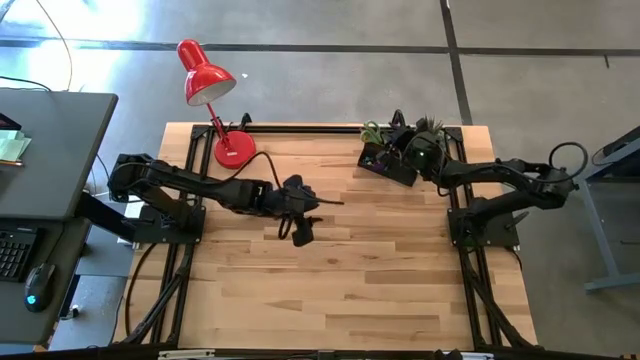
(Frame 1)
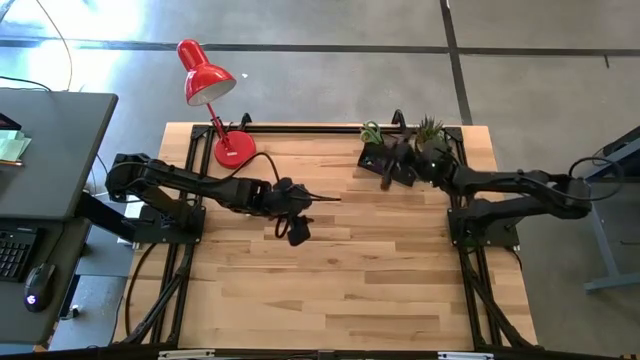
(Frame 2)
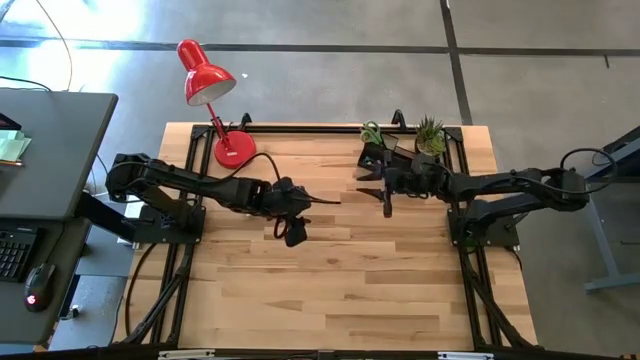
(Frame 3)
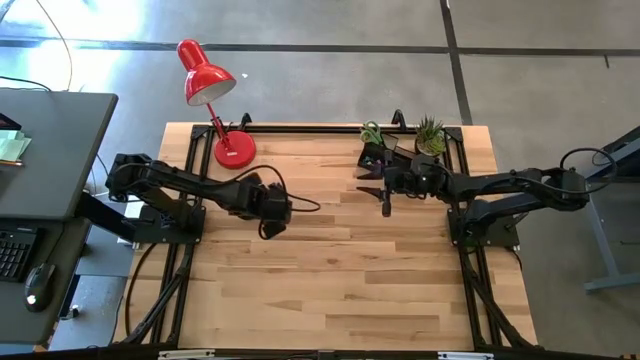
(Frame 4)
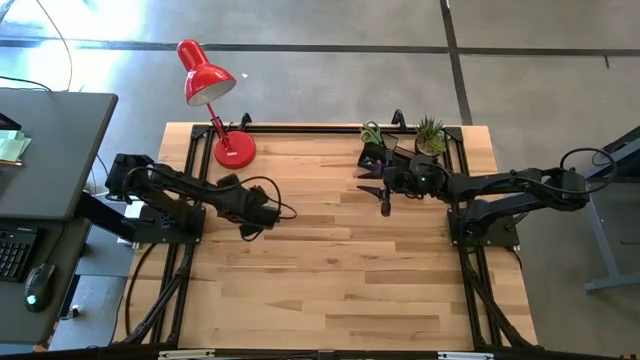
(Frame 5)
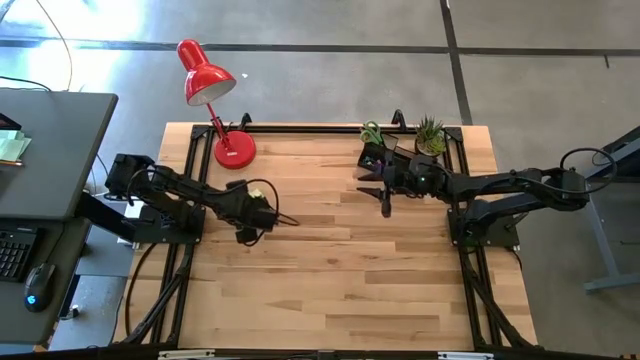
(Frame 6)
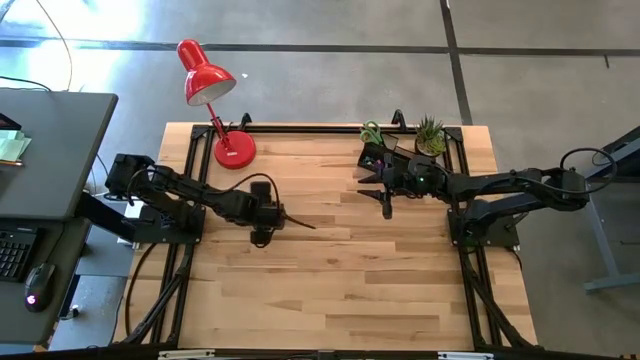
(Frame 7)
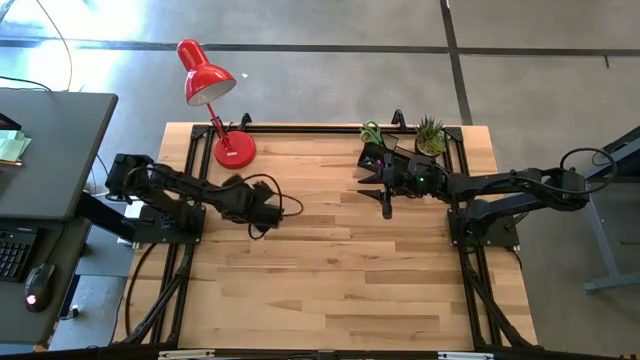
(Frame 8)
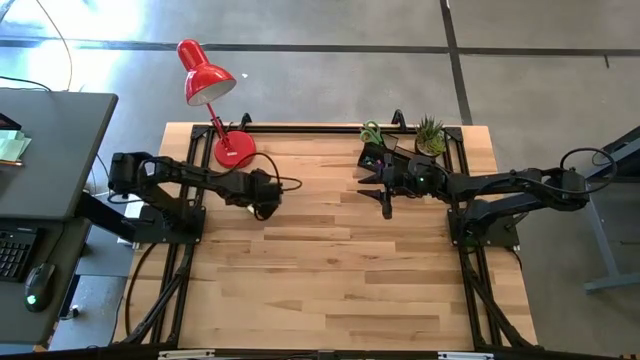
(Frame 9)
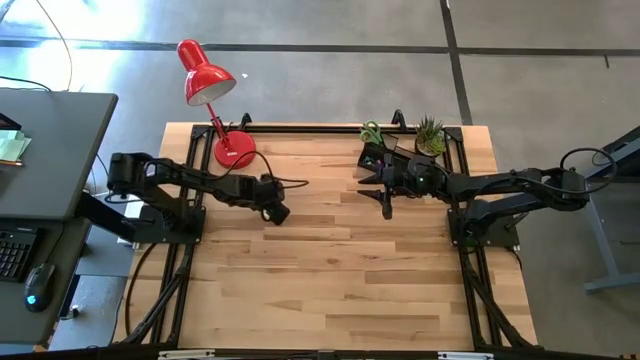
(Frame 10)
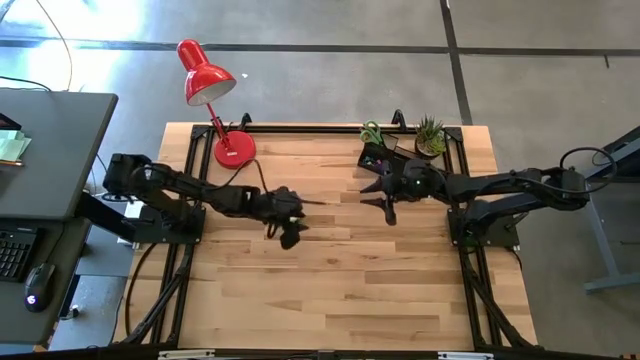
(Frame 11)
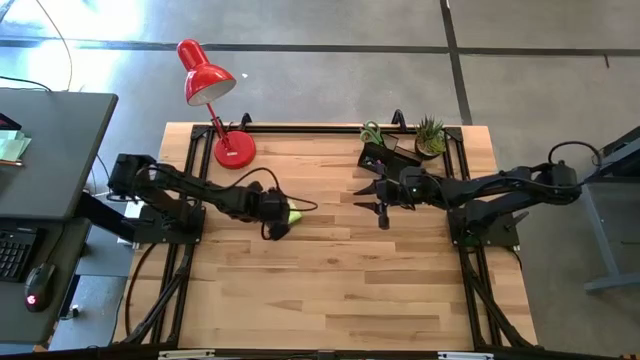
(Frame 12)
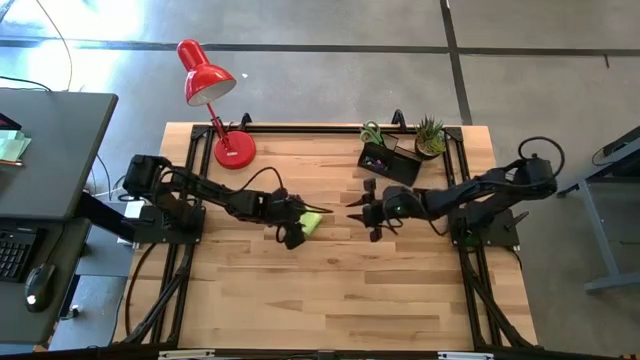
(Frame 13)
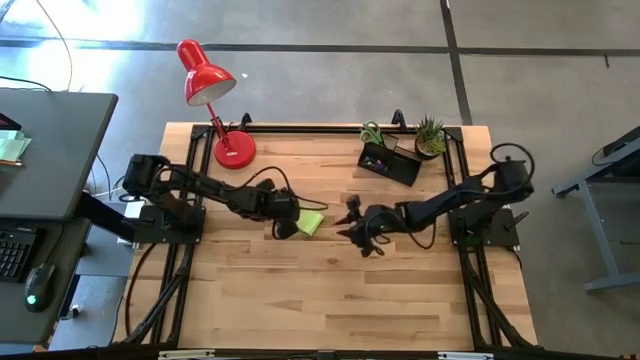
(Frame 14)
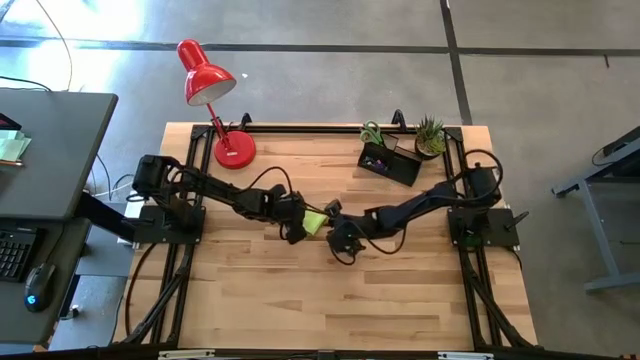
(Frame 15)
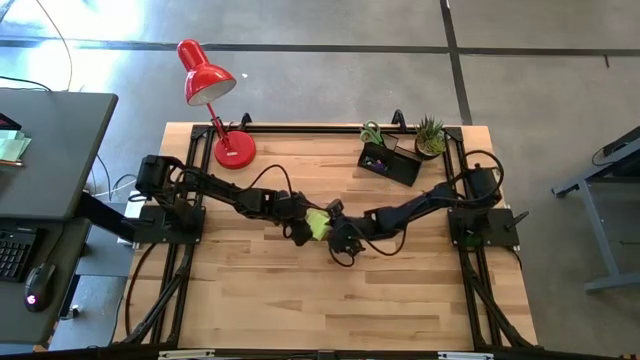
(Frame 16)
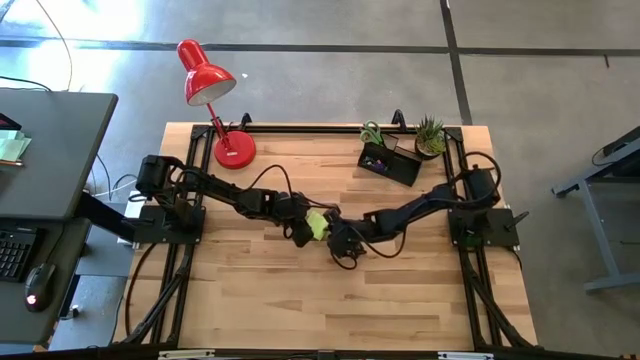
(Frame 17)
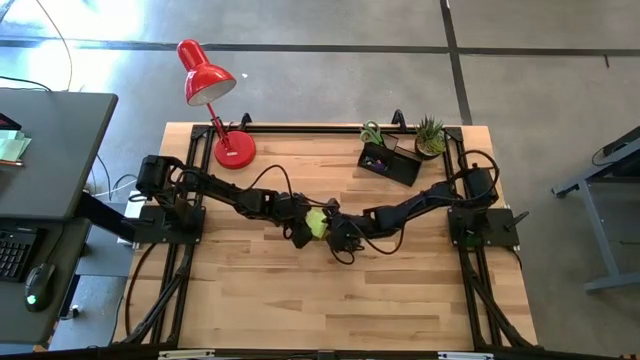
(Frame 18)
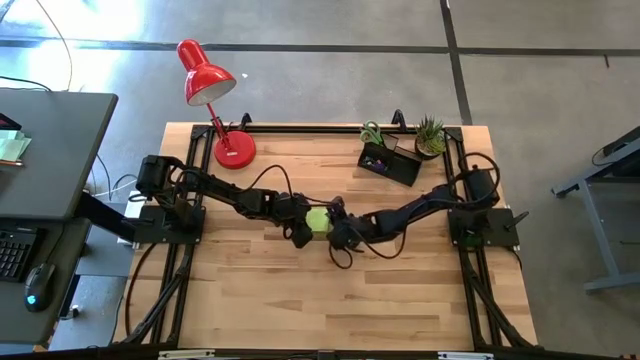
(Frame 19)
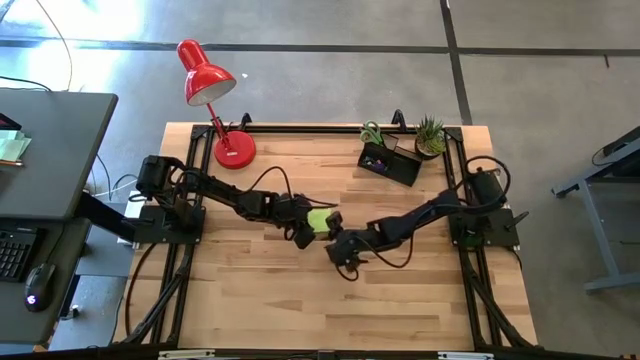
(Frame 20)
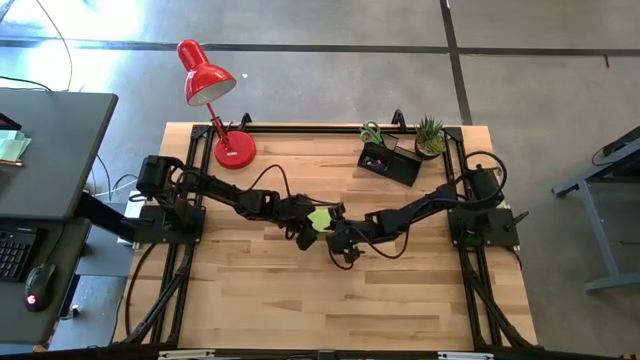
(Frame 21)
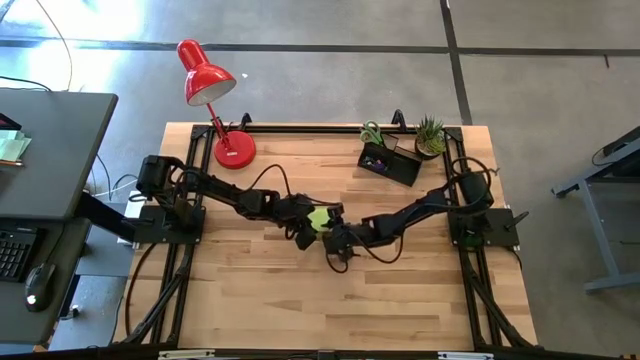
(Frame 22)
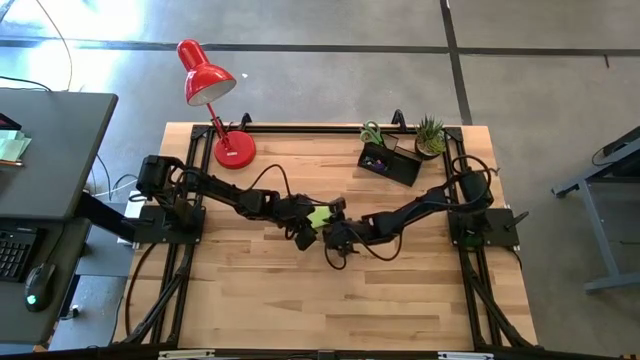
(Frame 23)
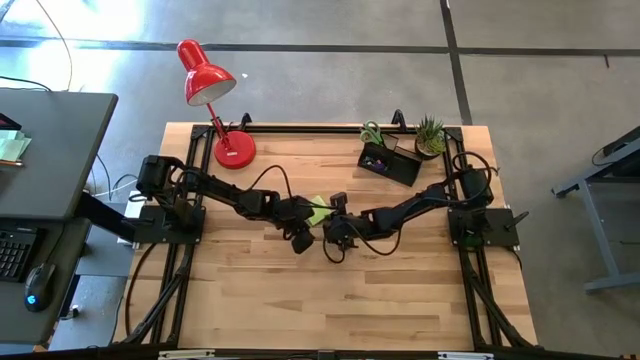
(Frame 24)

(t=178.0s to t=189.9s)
Task: Pick and place office supplies into organizer
Put the green sticky notes into the black desk organizer

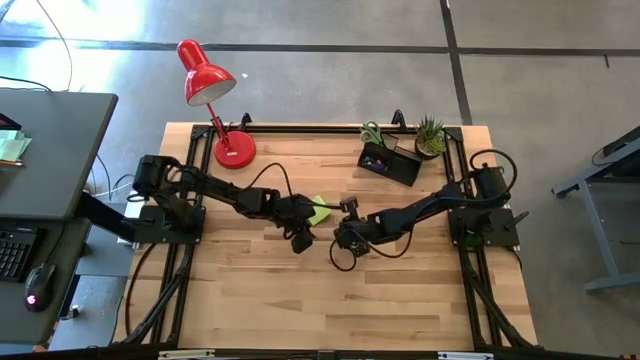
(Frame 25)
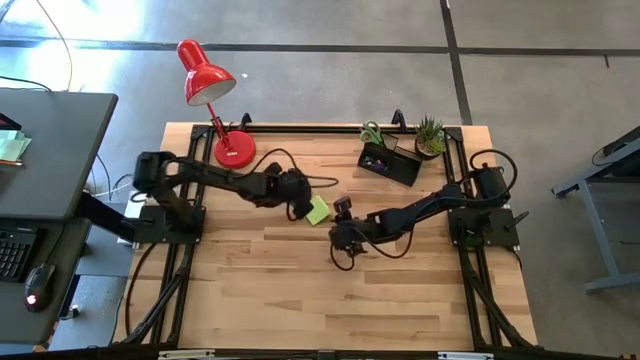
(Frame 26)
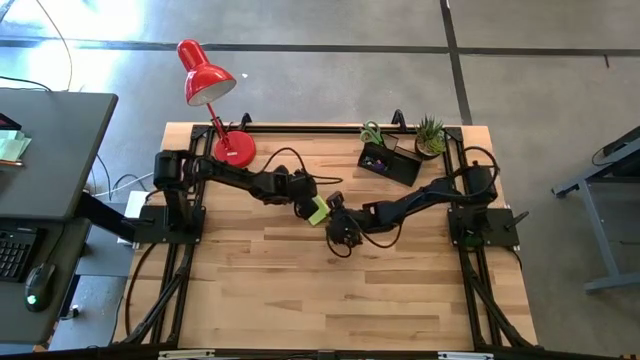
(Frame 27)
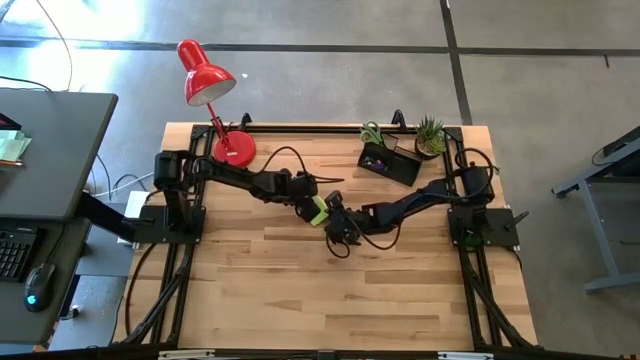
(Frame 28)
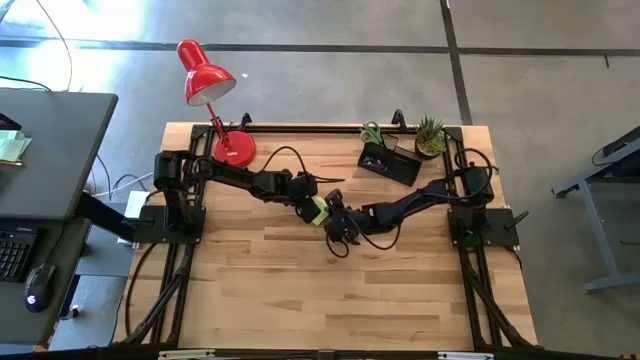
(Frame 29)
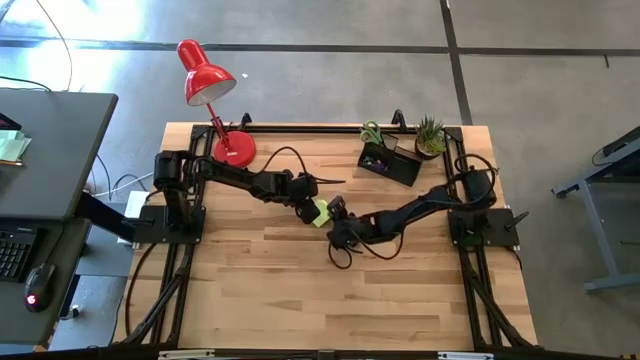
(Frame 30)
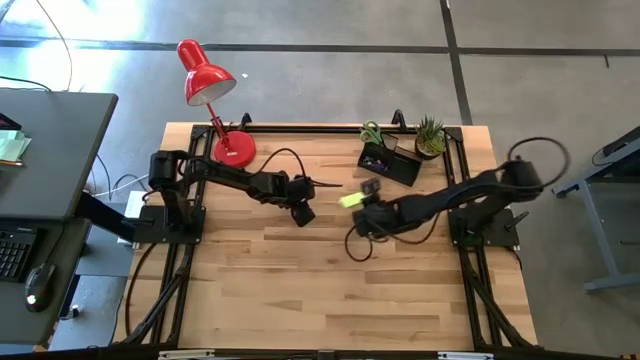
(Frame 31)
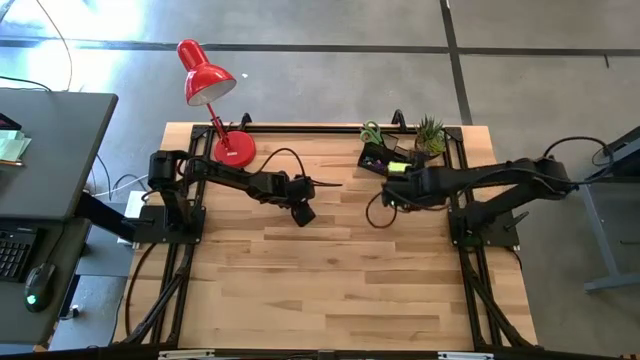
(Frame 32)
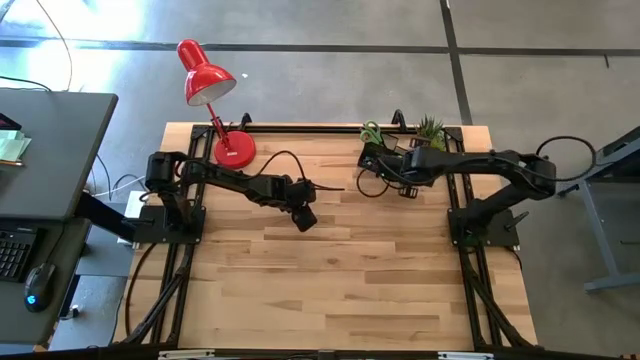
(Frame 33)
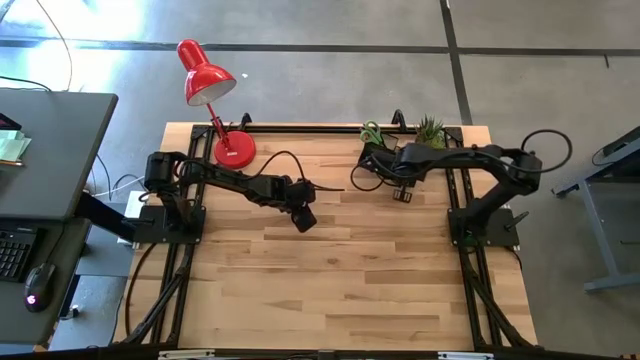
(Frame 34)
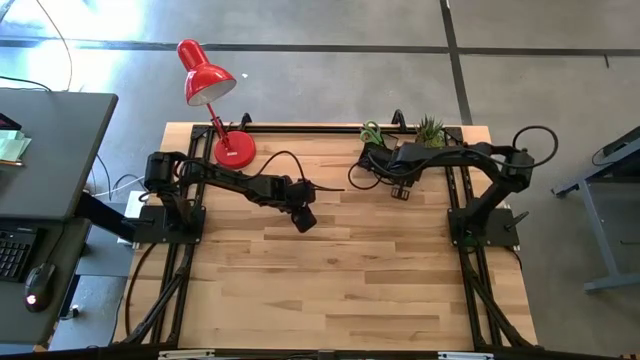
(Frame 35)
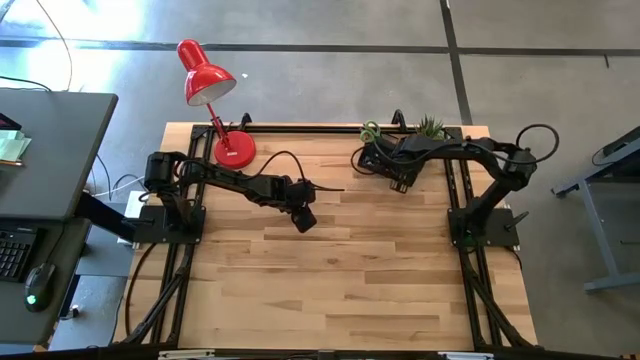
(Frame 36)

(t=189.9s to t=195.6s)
Put the green sticky notes into the black desk organizer

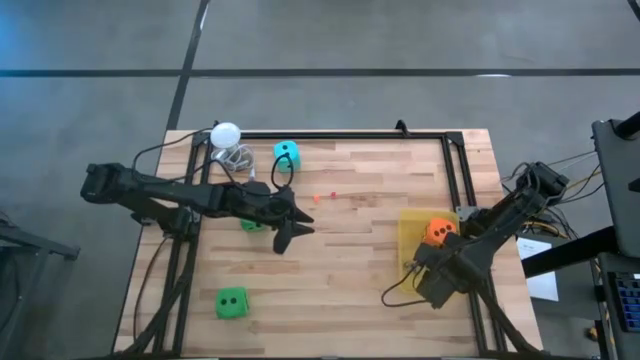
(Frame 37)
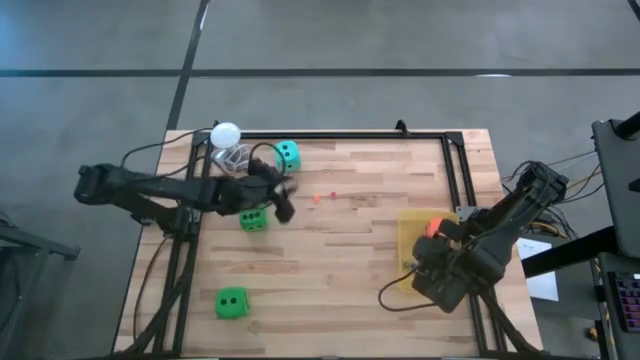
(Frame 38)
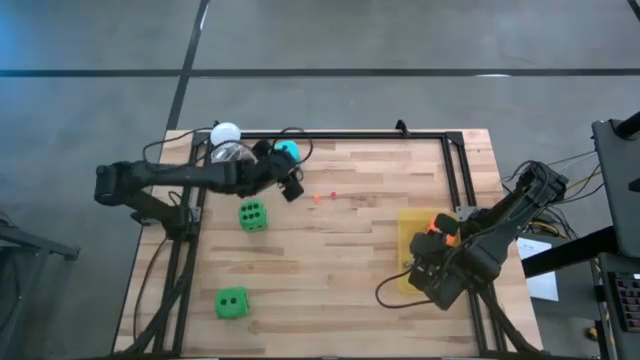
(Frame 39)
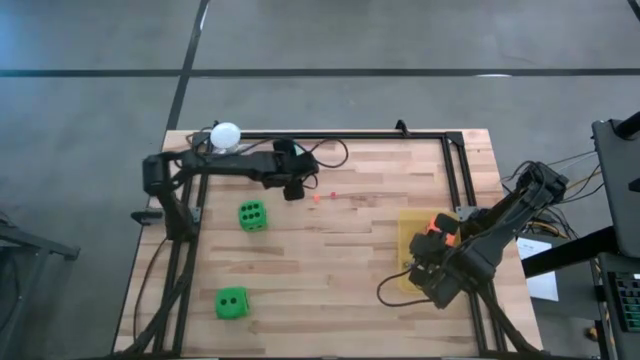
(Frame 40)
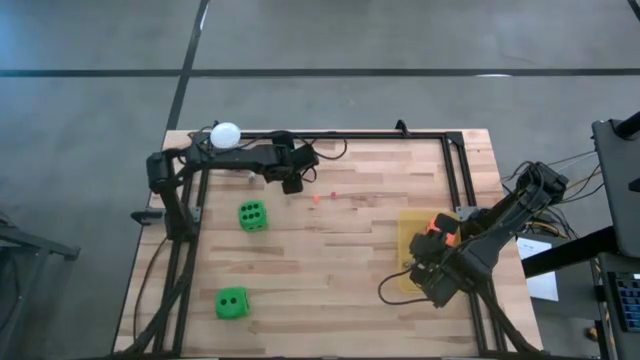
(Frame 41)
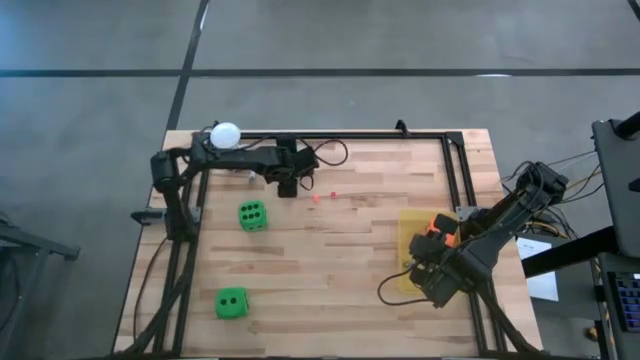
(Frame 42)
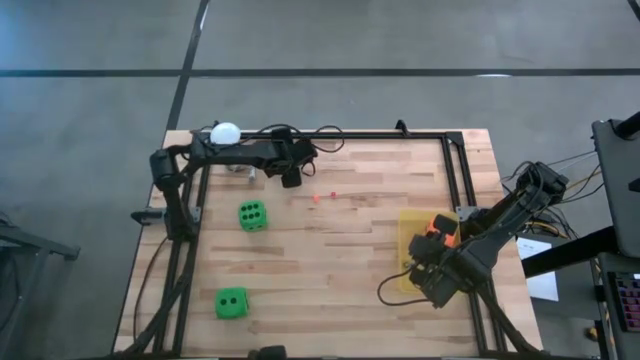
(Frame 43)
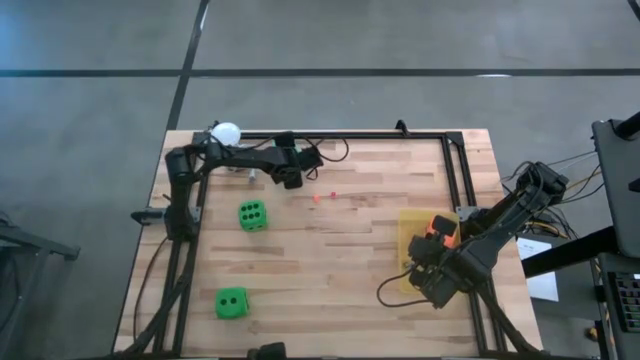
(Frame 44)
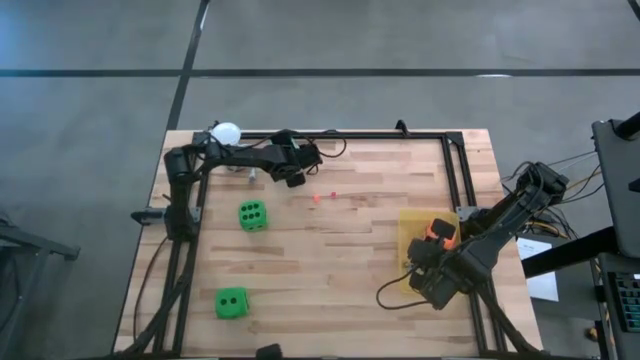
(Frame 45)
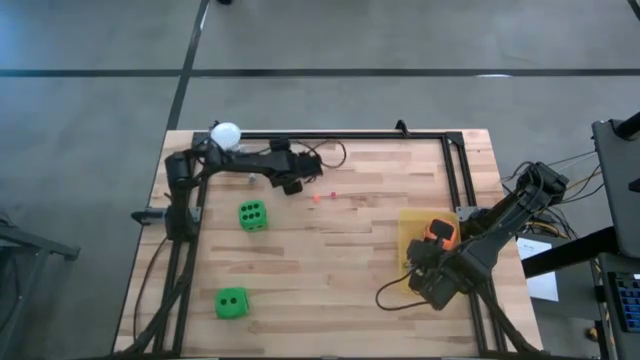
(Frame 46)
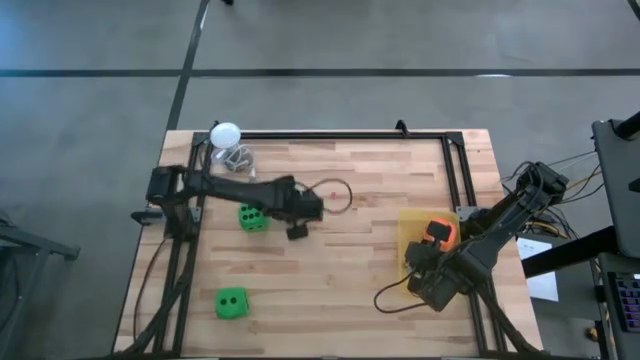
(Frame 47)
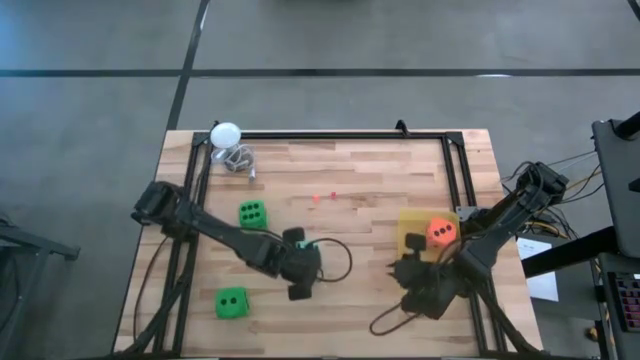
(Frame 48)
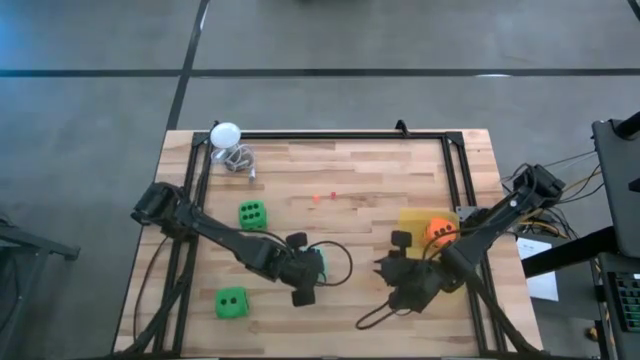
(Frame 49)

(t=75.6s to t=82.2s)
Task: Pick & Place Dice
Put the large blue dice into the yellow bin
